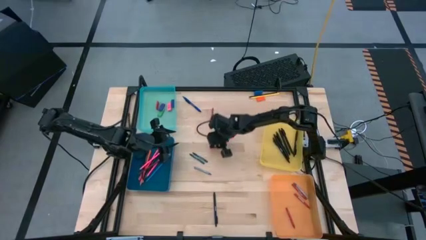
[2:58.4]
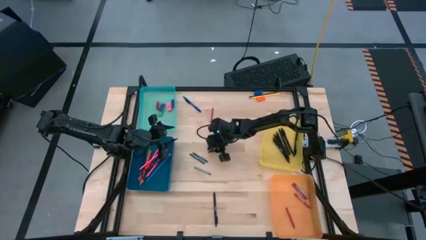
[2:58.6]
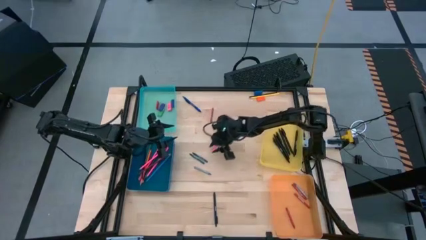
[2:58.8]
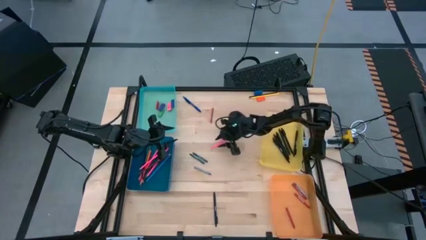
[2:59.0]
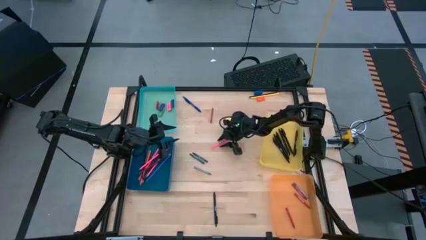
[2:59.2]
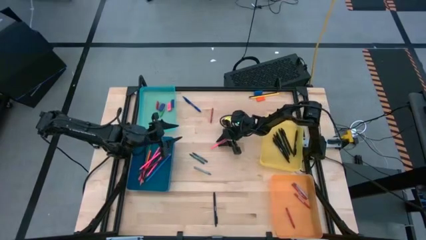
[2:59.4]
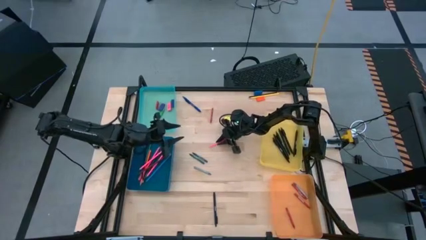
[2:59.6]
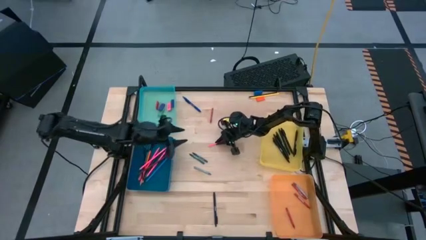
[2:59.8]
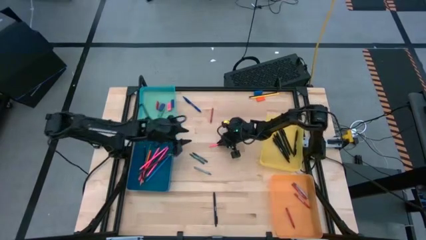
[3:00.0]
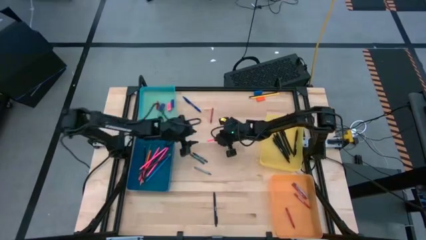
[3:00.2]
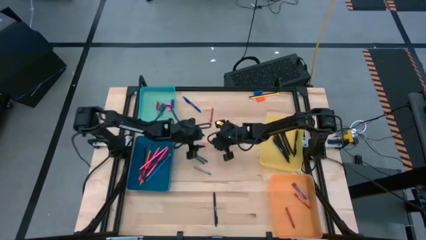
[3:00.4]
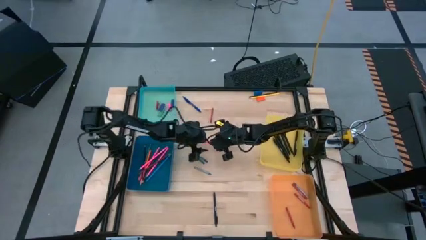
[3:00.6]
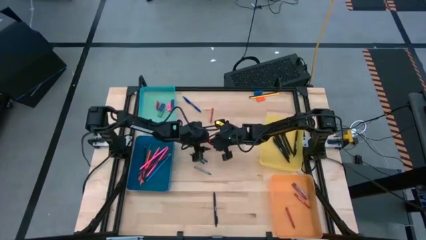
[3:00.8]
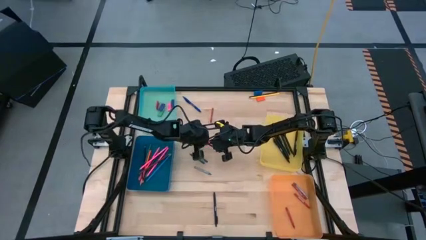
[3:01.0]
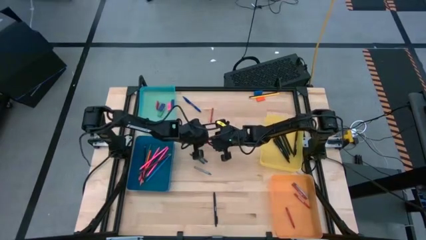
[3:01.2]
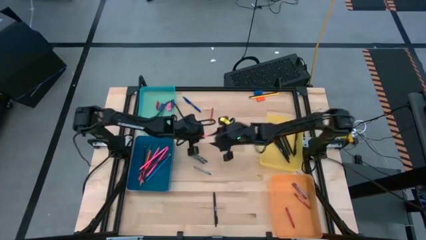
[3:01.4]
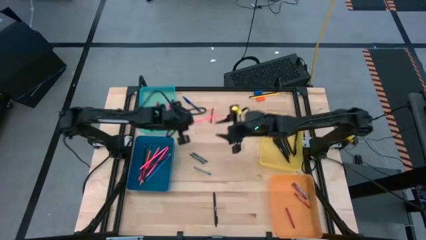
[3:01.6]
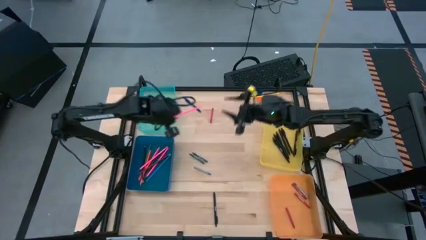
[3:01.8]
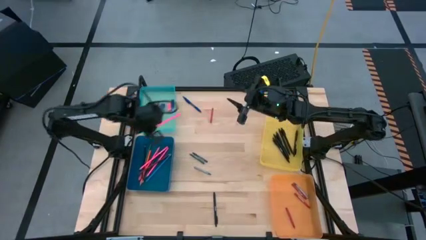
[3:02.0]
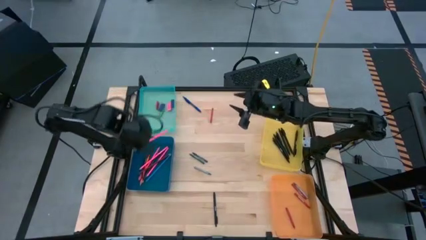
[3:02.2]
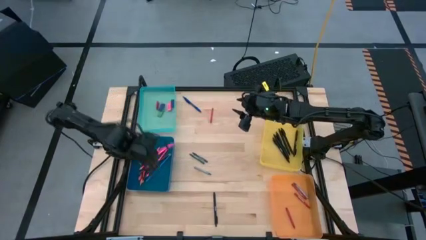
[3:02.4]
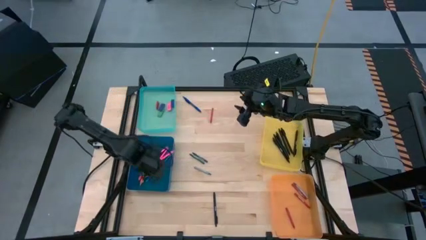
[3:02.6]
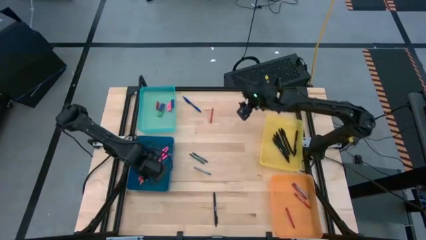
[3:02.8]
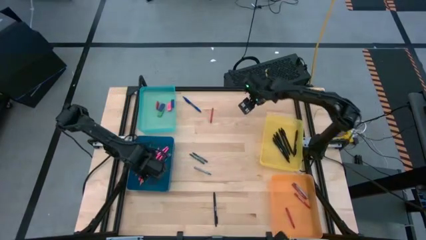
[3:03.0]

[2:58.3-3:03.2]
Task: Sort crayons/erasers/pens/pencils in bins
Put the pink colored pencil into the blue bin

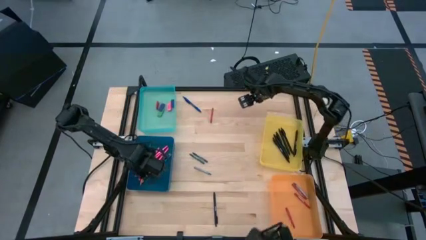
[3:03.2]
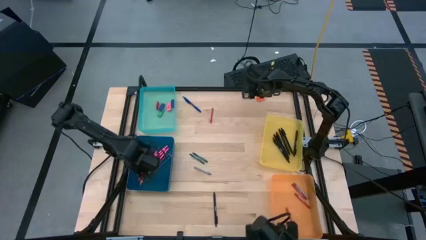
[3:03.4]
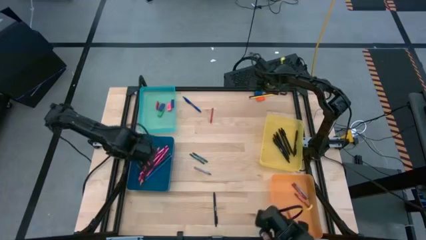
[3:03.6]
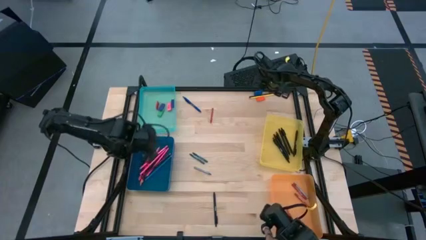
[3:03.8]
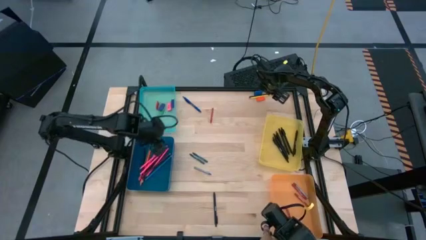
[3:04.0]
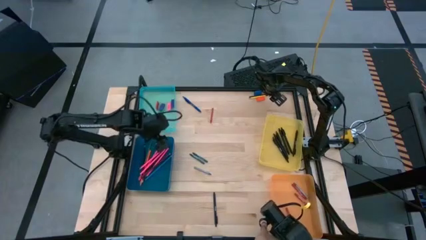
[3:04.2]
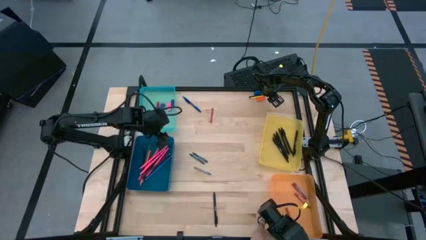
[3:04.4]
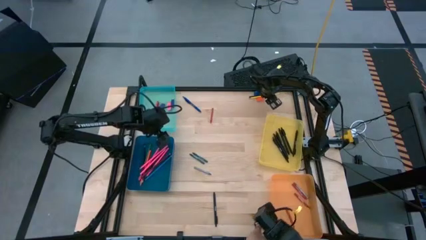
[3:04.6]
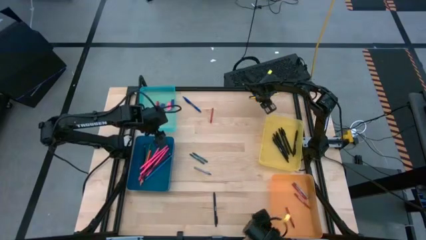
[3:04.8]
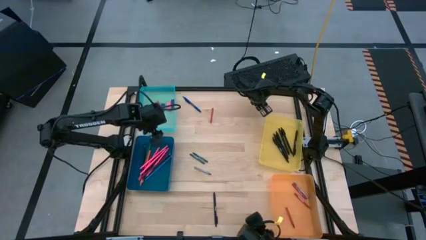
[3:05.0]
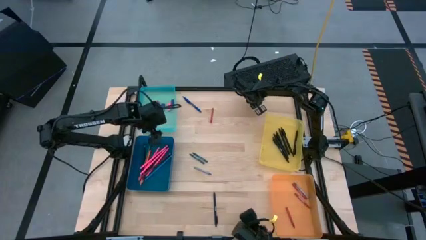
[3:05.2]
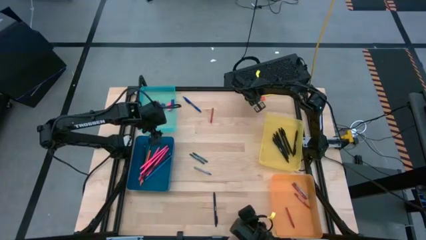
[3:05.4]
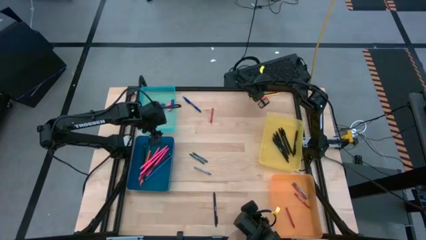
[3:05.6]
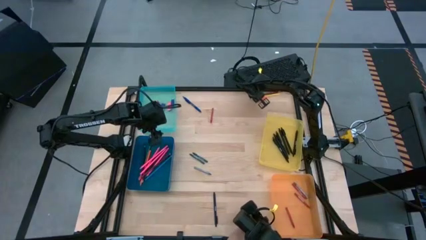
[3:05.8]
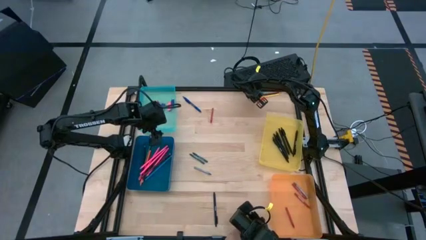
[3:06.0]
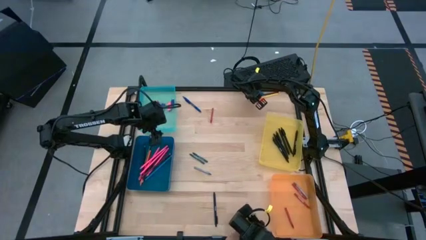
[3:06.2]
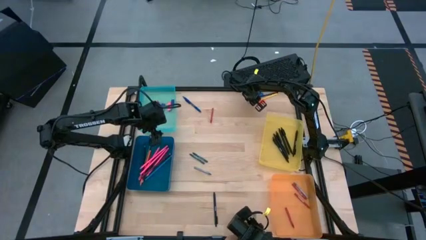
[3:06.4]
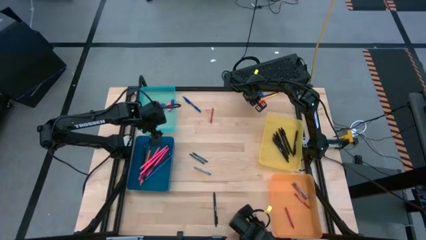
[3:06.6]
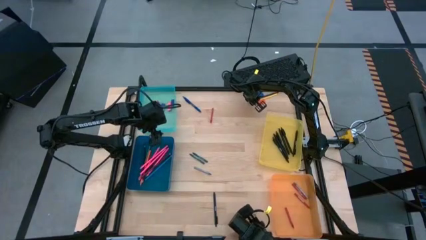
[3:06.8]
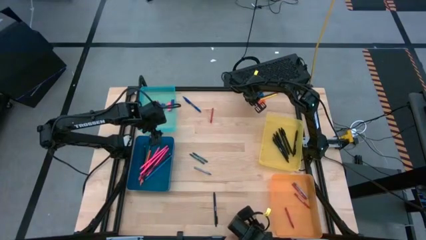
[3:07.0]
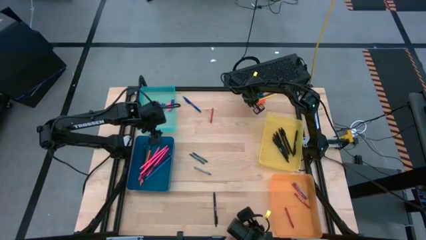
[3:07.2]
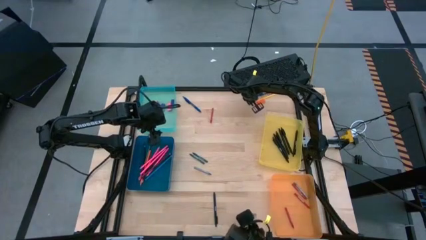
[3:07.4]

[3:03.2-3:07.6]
Put the dark blue colored pencil into the blue bin

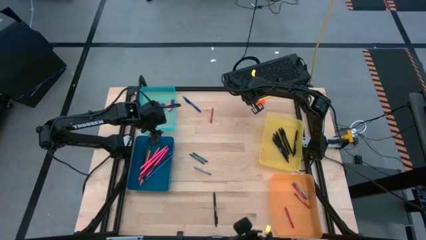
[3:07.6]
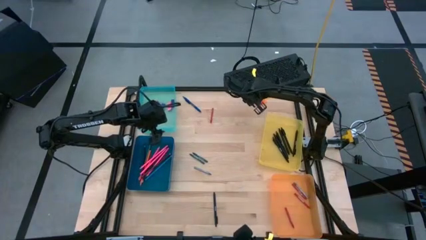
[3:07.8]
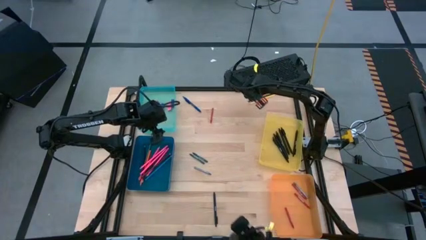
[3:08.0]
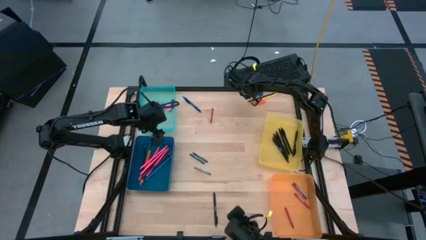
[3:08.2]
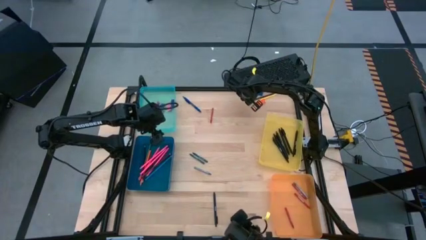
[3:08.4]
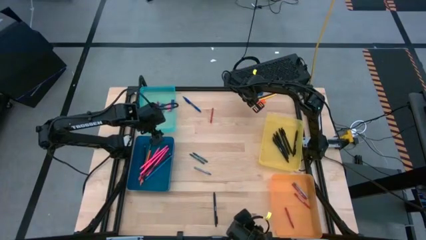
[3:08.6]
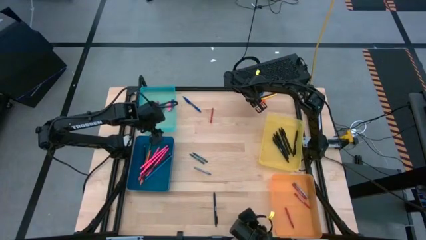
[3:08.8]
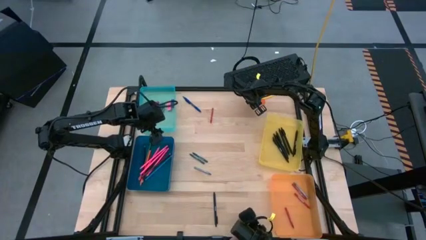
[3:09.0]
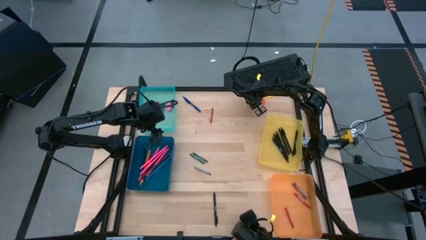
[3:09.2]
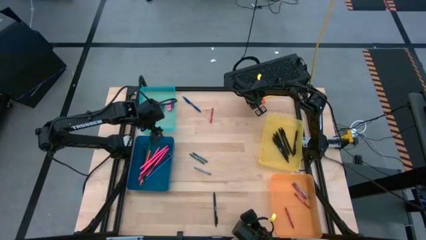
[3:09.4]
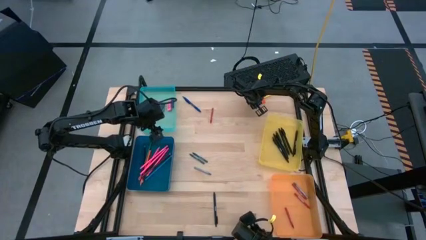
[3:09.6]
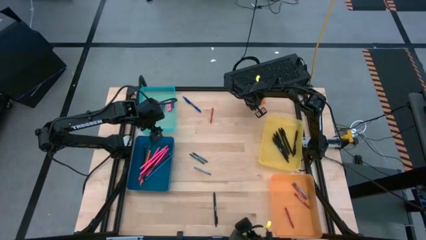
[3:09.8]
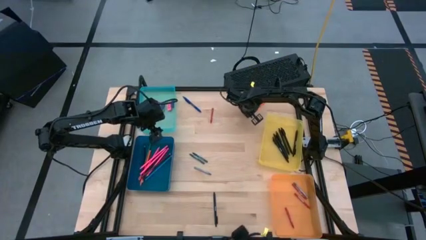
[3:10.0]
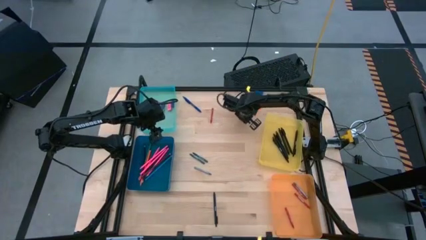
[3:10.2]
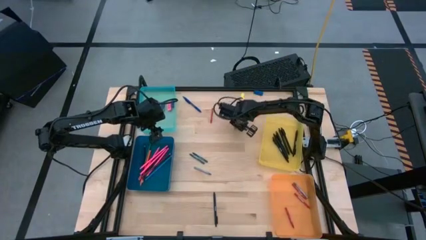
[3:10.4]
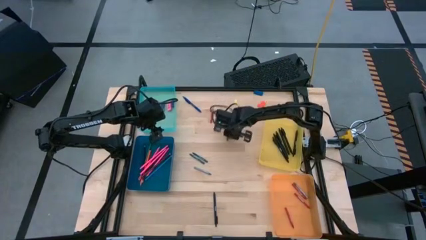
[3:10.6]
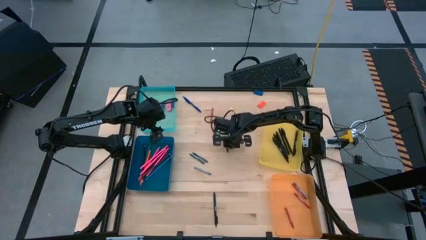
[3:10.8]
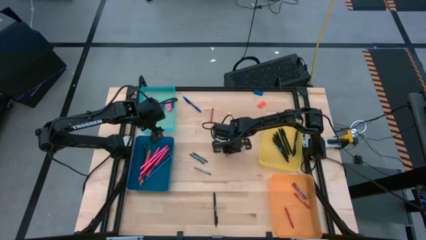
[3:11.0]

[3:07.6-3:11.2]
Move the colored pencils to the center of the table

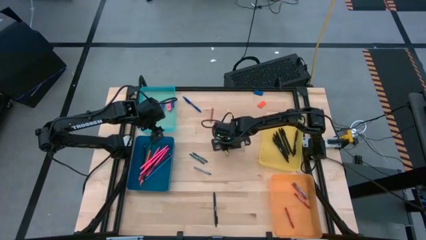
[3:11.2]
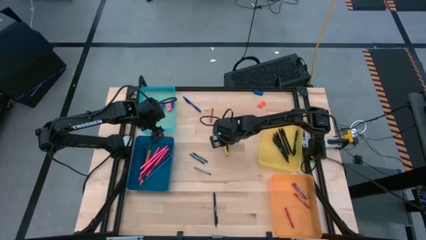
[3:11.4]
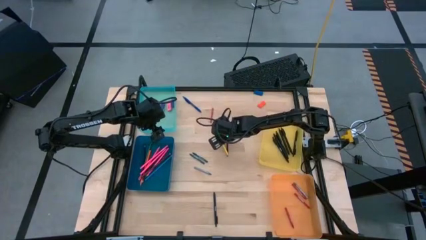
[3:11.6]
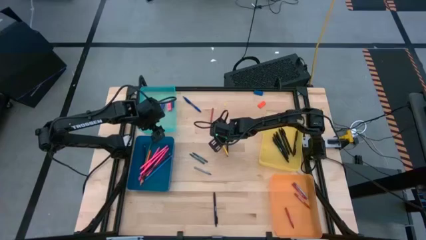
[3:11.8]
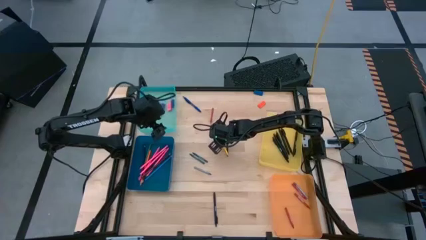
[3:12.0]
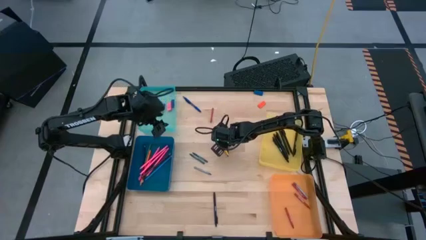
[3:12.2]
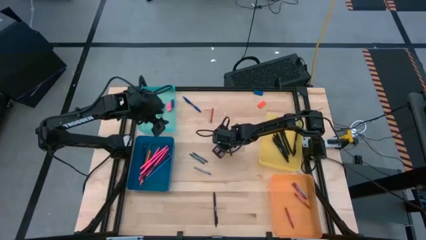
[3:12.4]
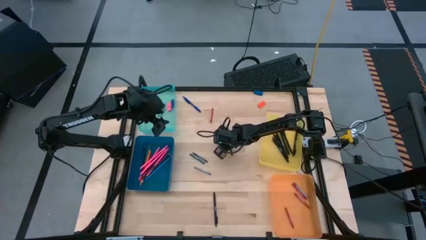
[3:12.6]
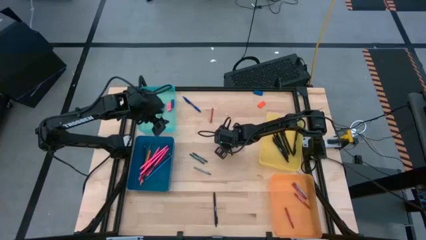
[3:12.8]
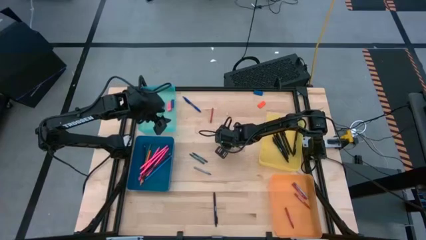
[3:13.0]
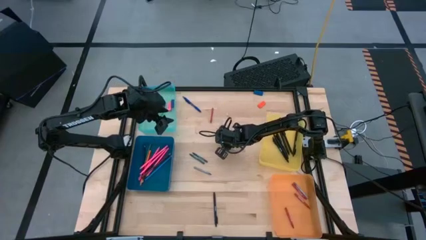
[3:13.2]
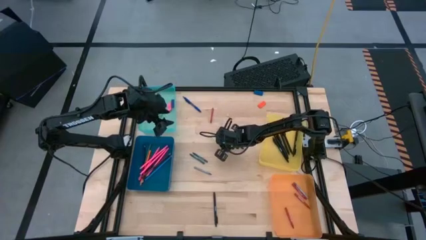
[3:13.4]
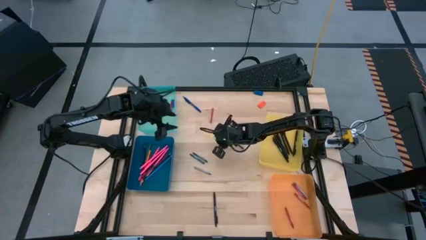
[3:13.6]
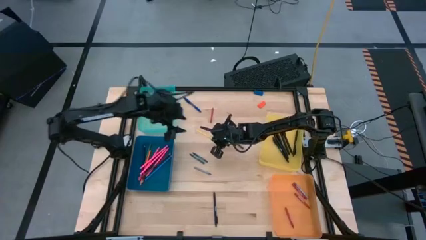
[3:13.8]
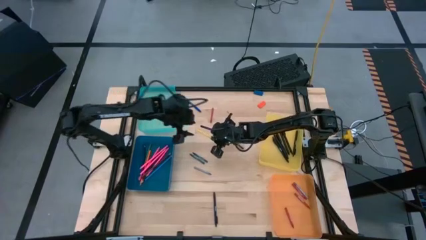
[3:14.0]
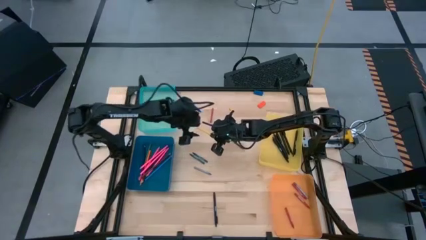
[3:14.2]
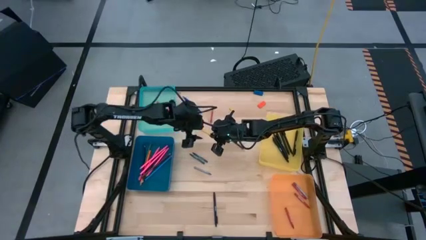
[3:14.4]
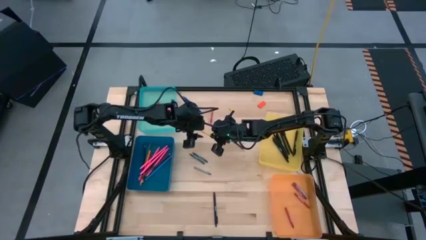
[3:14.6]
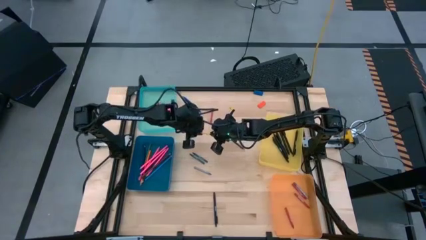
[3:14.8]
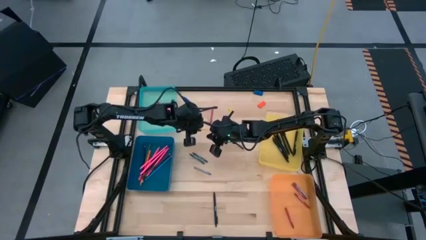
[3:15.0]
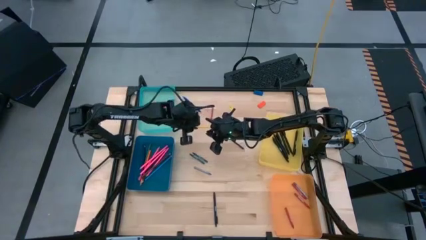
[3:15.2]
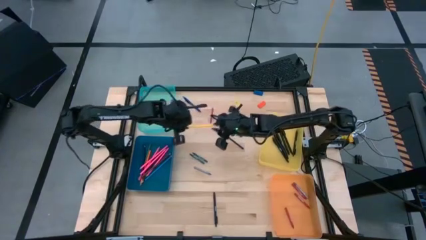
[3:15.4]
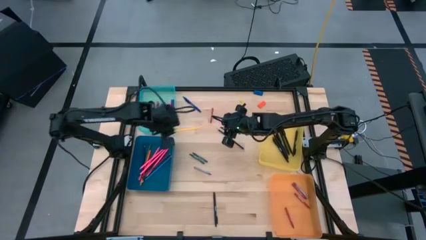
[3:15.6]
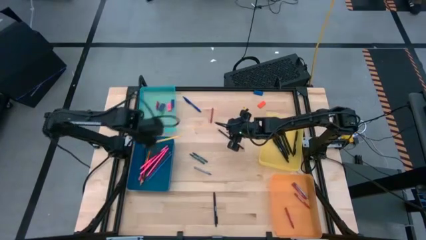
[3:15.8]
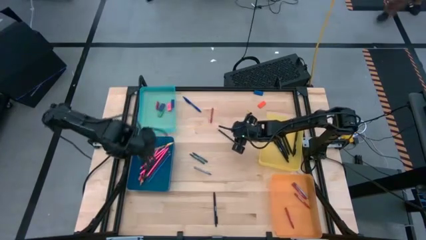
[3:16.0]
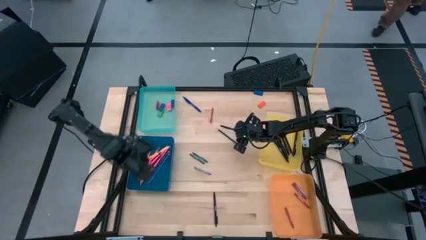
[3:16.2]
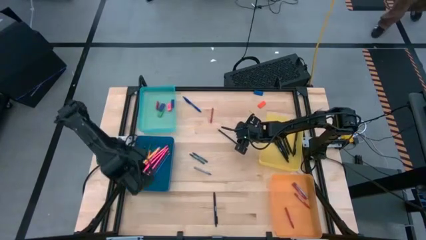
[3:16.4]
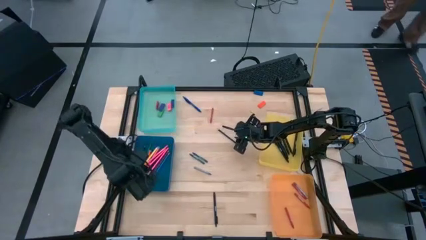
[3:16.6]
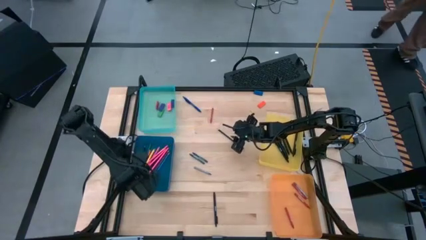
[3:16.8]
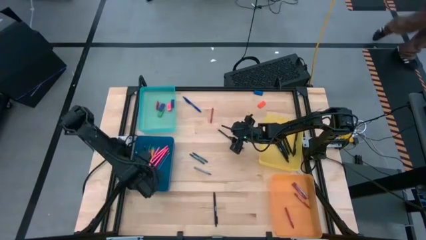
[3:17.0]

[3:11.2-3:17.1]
Put the yellow colored pencil into the blue bin
